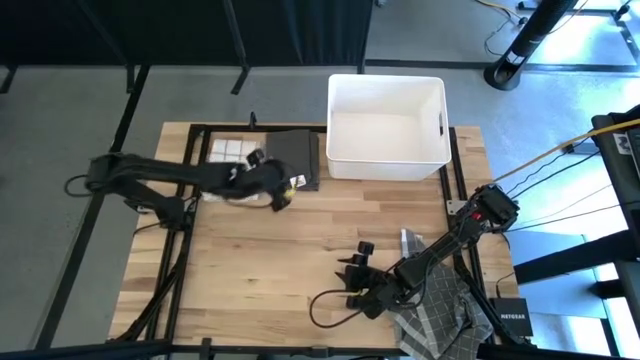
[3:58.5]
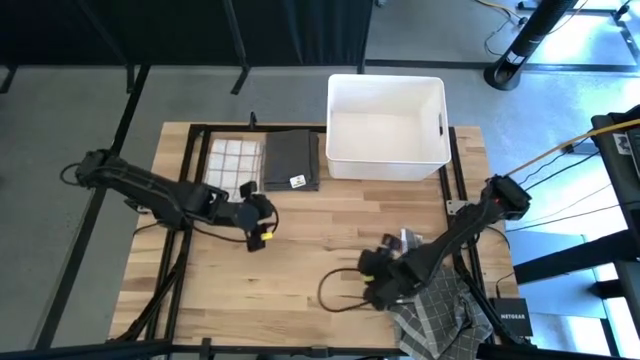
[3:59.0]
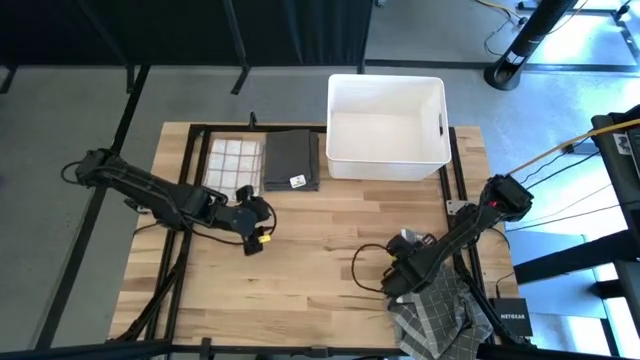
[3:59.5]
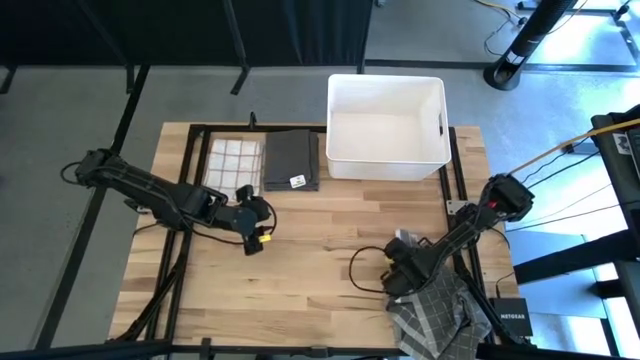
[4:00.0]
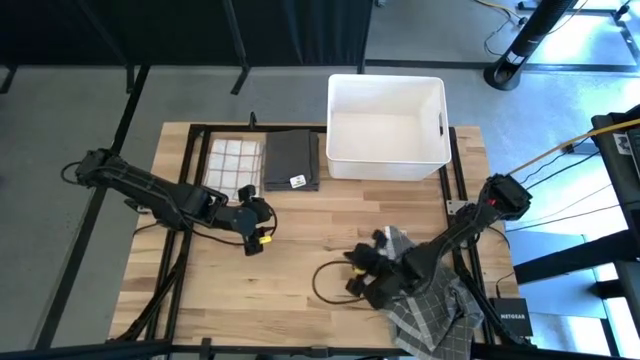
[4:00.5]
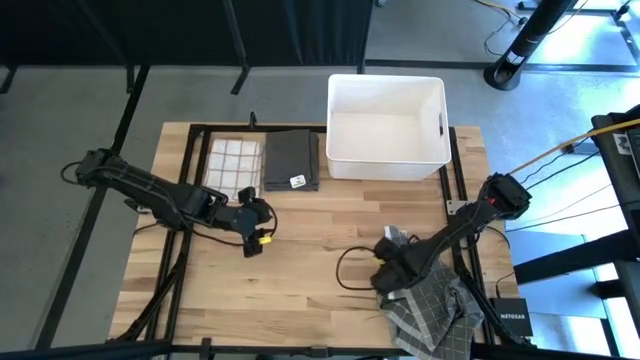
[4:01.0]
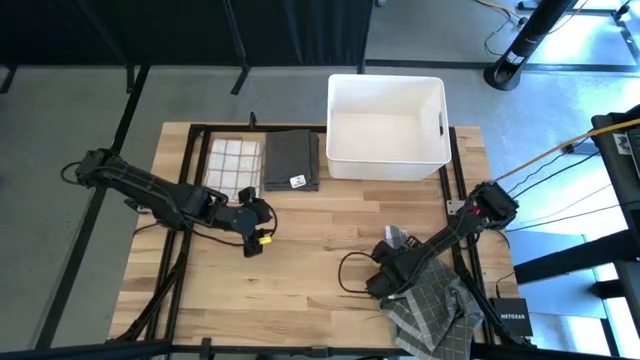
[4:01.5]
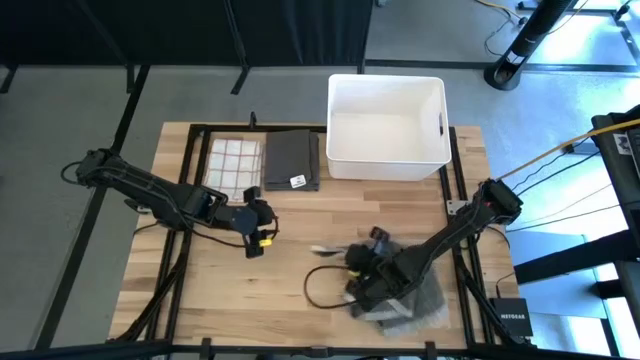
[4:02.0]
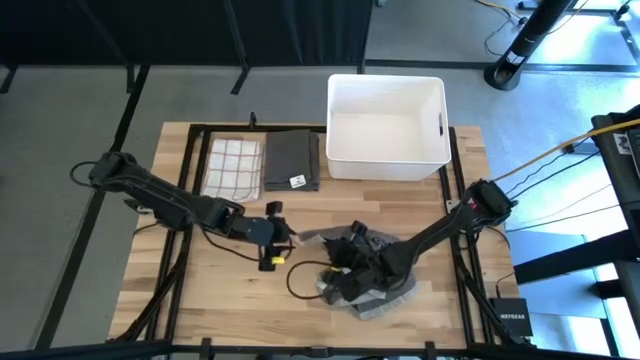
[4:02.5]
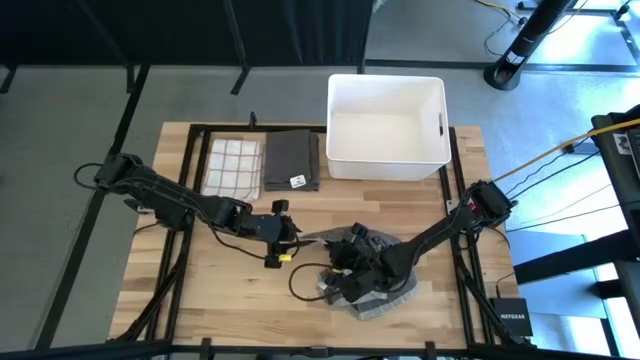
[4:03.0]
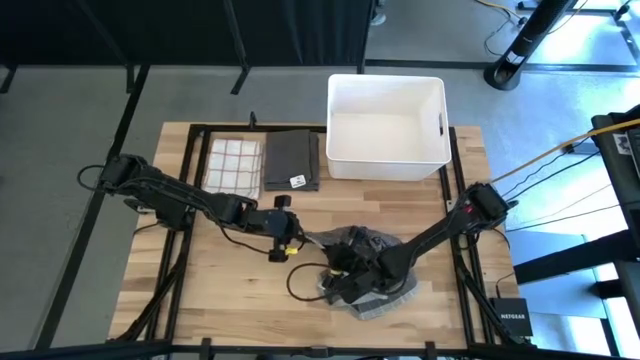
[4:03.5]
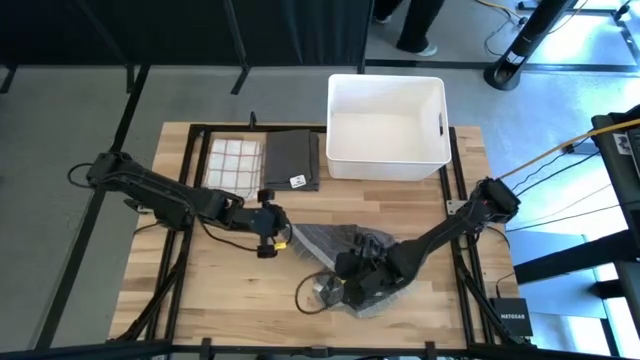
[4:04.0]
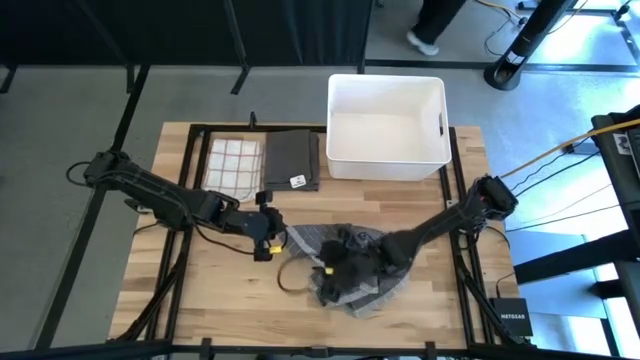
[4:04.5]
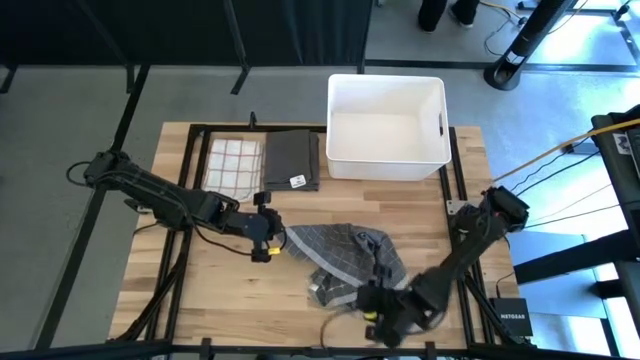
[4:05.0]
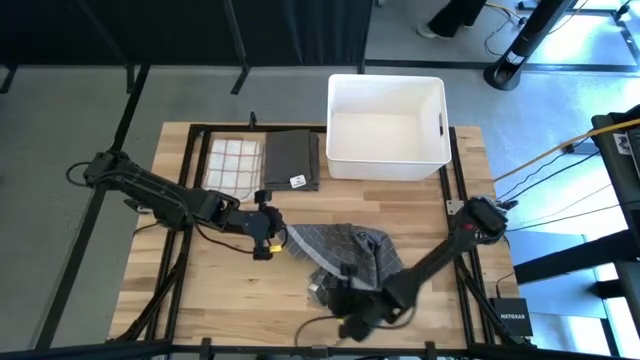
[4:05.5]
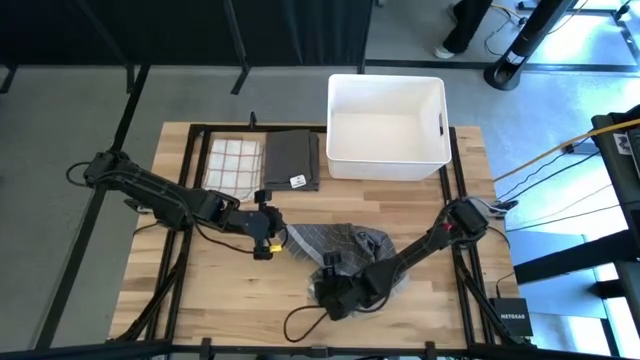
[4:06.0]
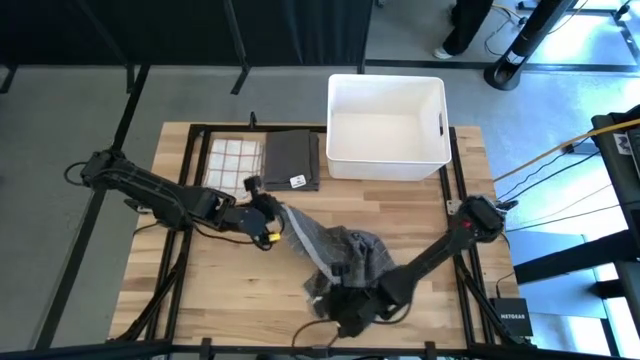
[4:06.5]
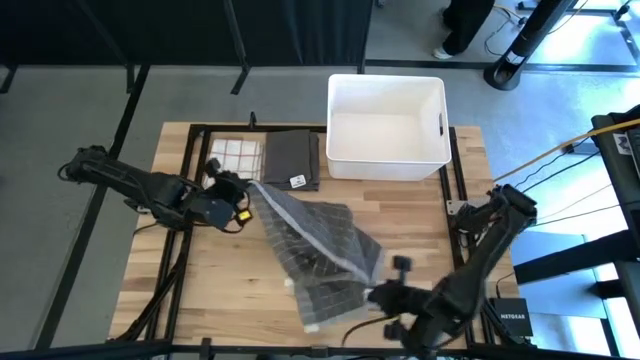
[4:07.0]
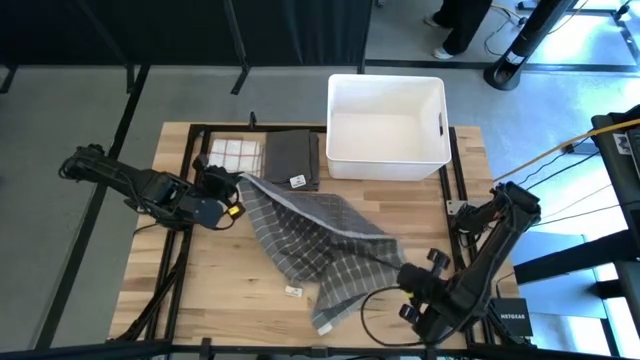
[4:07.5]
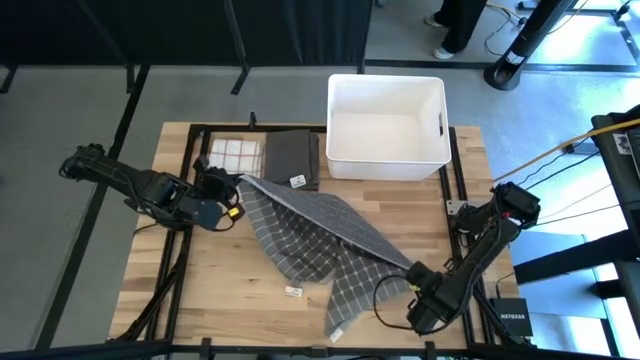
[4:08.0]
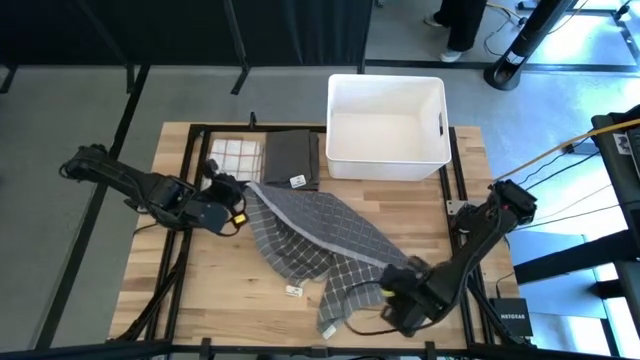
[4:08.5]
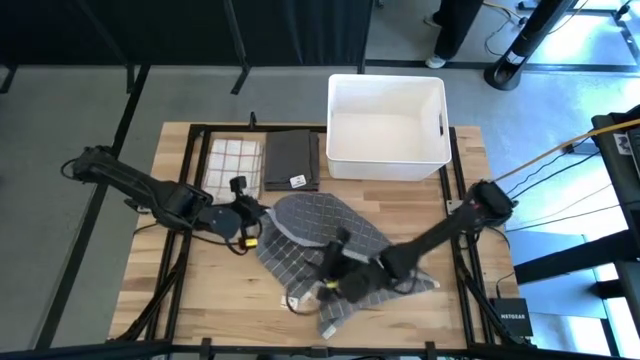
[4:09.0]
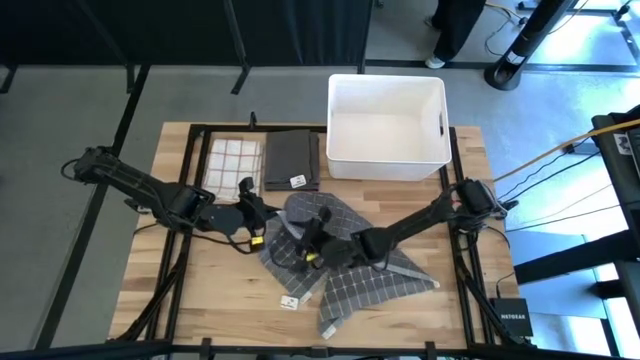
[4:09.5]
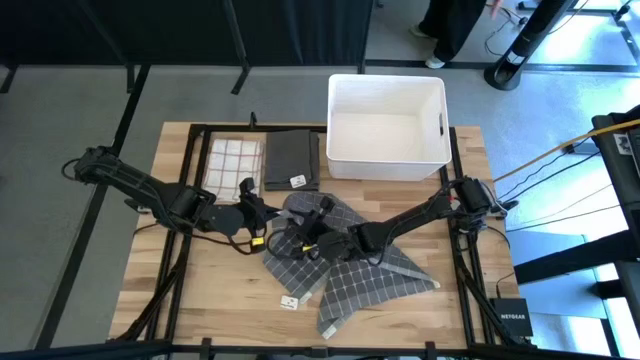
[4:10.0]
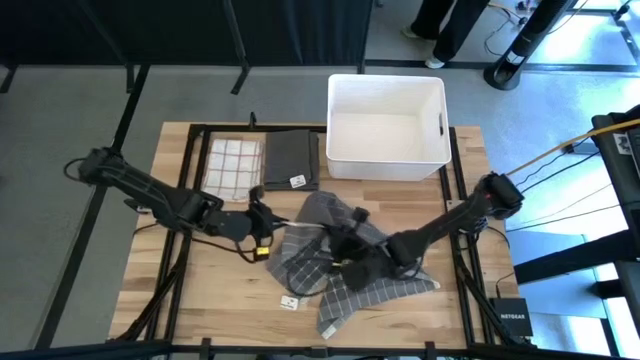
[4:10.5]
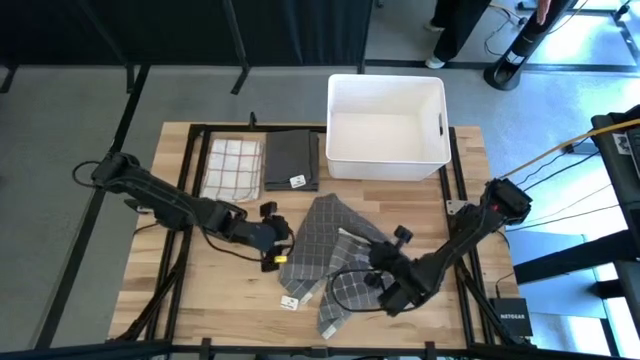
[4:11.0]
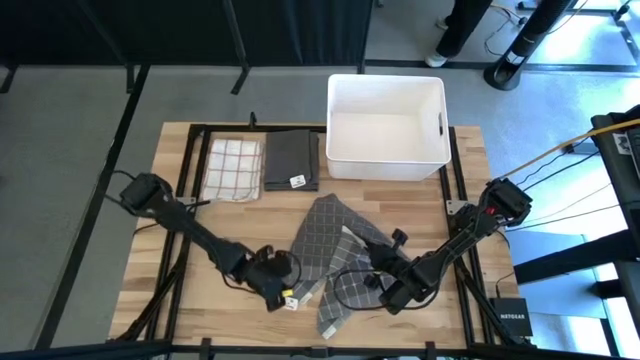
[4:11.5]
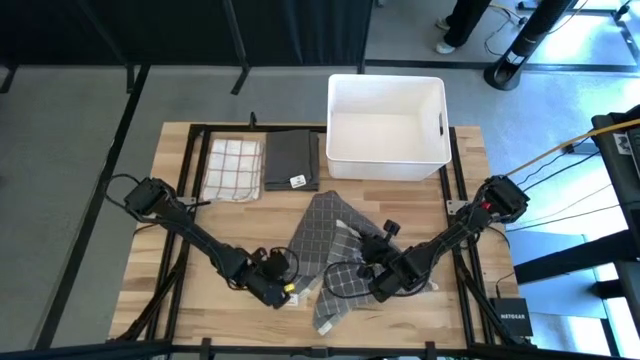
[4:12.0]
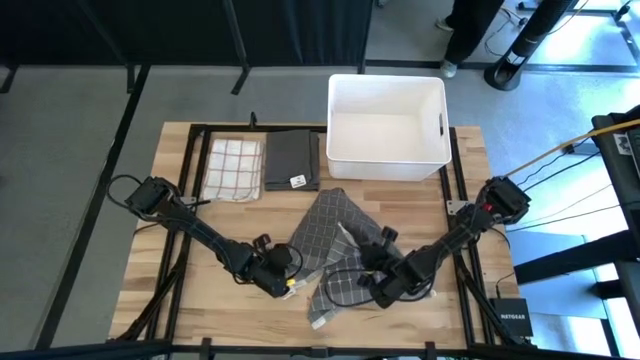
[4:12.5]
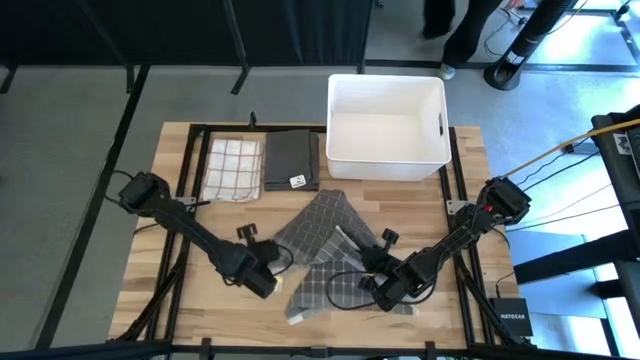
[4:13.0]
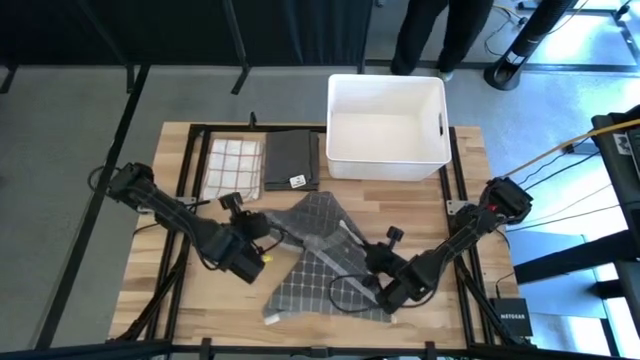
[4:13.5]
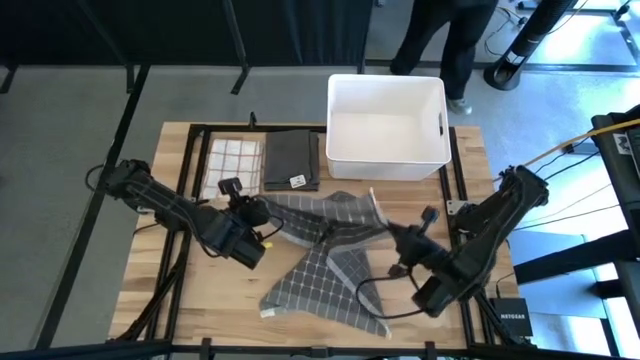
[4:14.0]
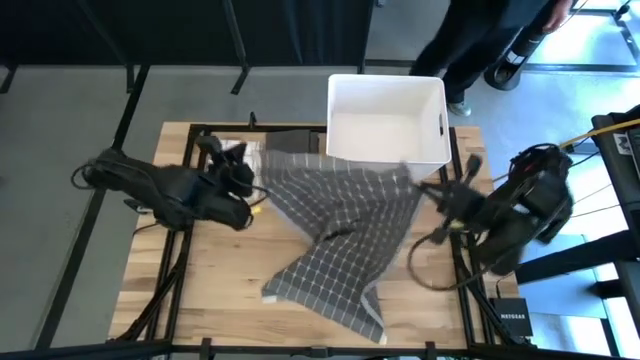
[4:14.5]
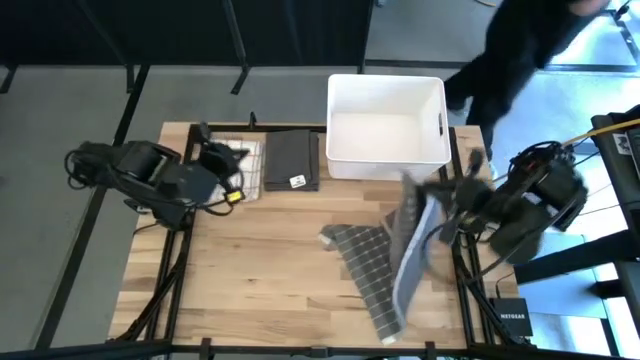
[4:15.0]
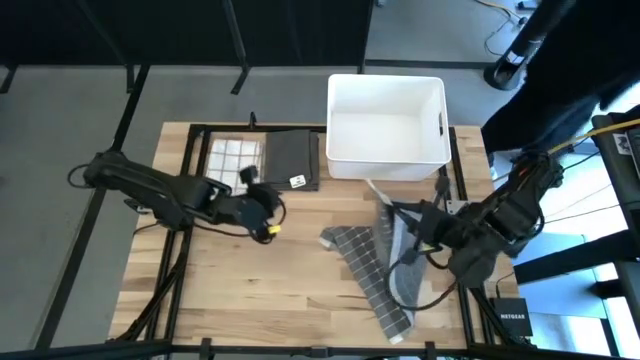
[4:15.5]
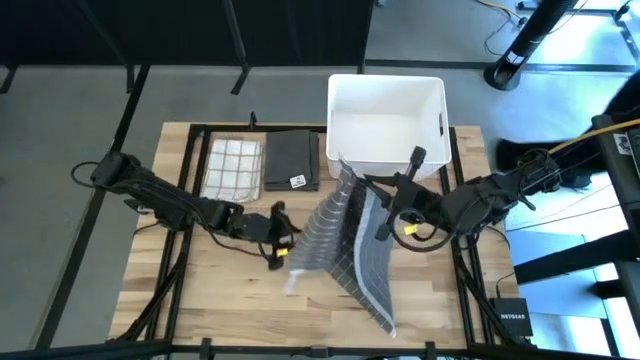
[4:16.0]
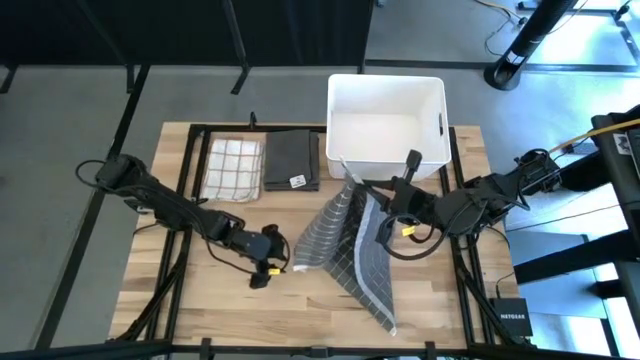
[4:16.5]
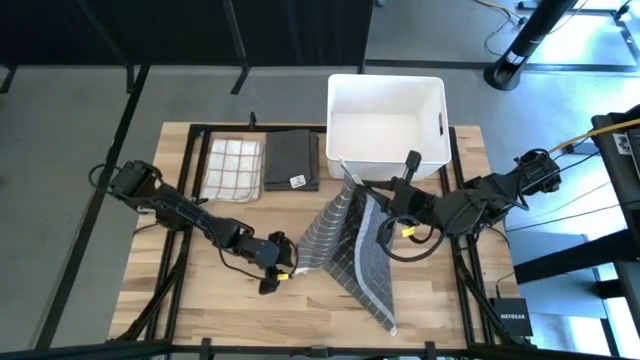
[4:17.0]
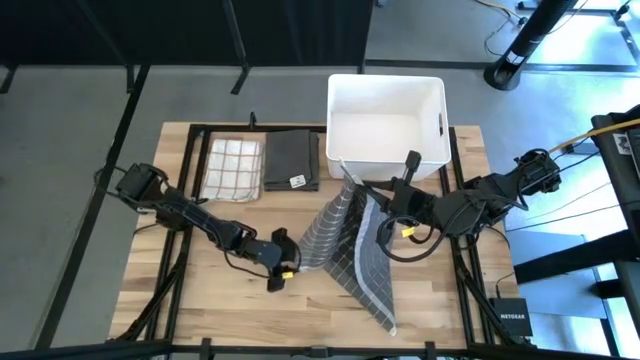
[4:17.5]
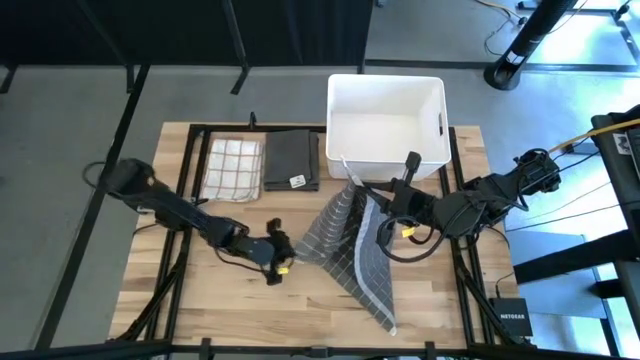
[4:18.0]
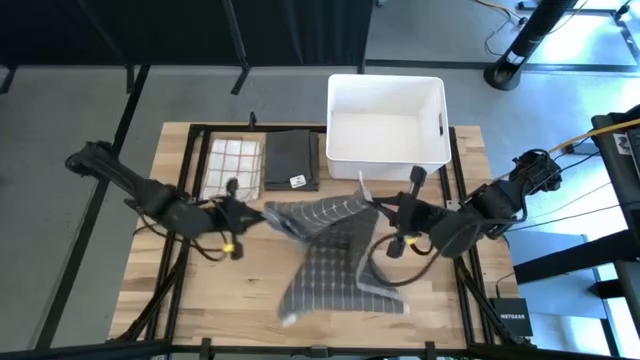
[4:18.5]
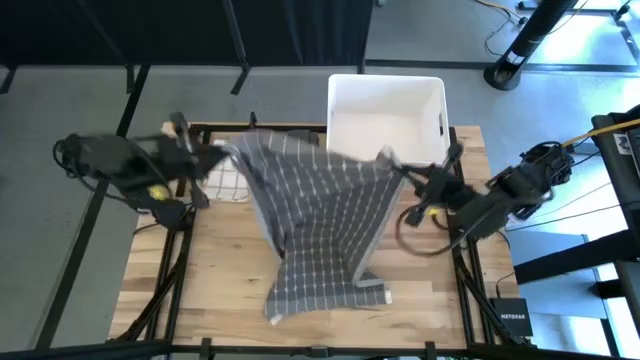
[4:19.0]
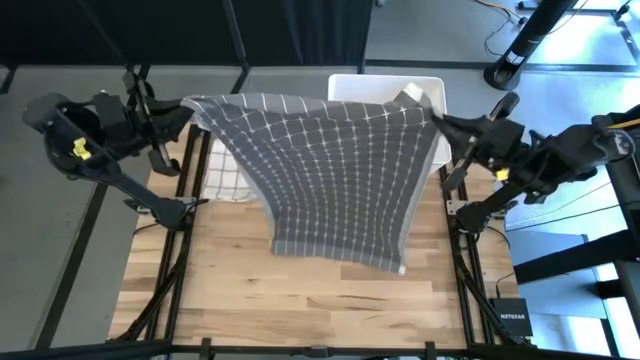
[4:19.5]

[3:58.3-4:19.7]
Task: Fold towel
Fold the grey patterned towel
